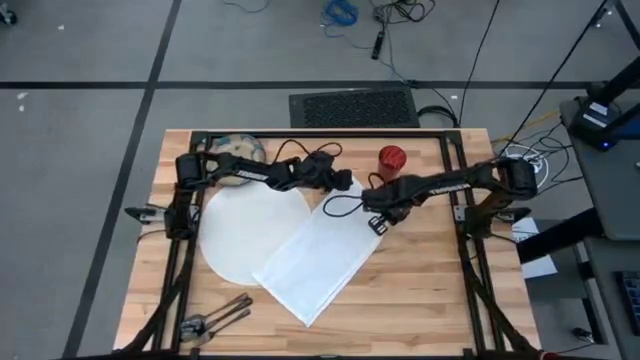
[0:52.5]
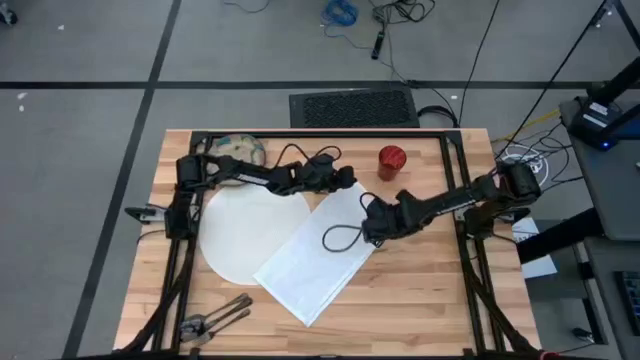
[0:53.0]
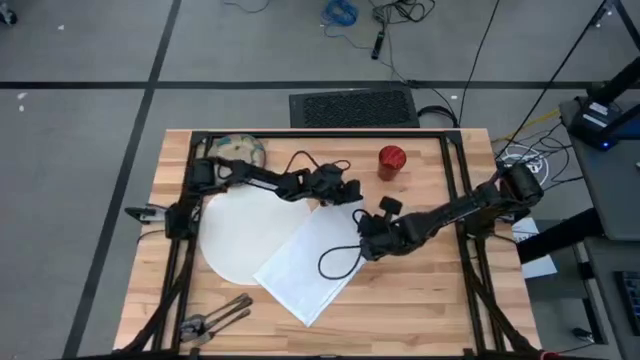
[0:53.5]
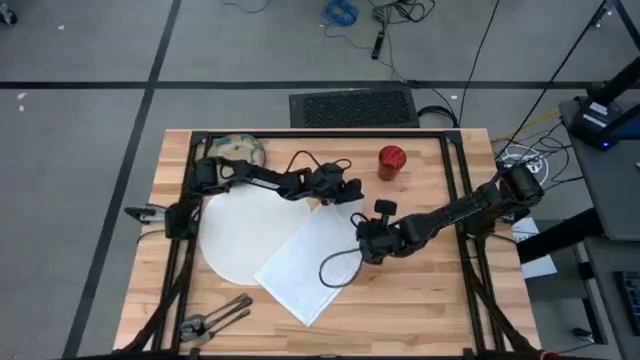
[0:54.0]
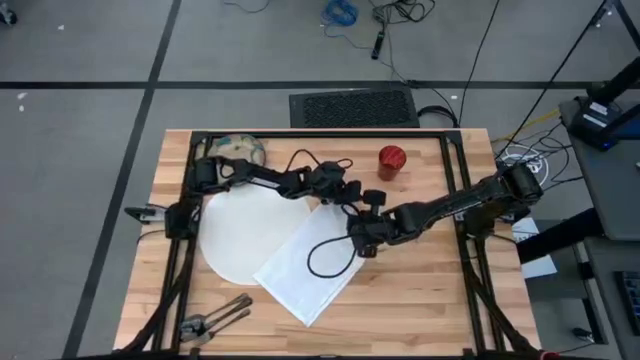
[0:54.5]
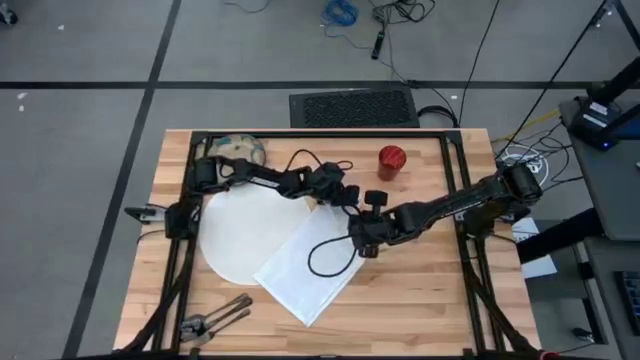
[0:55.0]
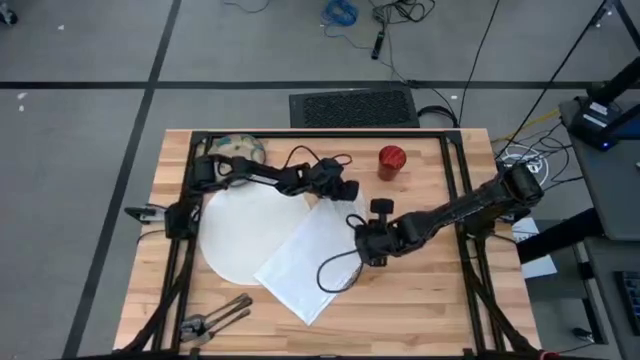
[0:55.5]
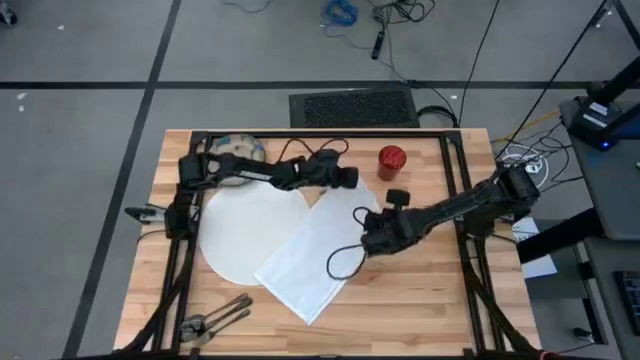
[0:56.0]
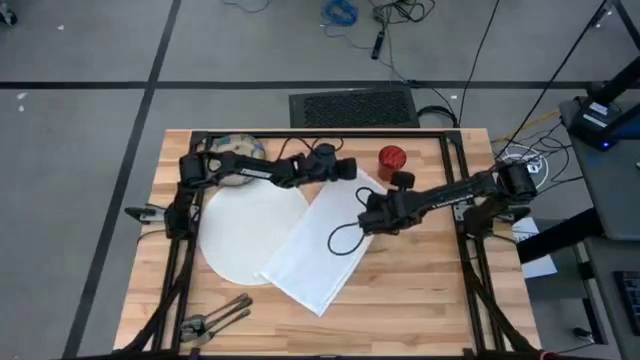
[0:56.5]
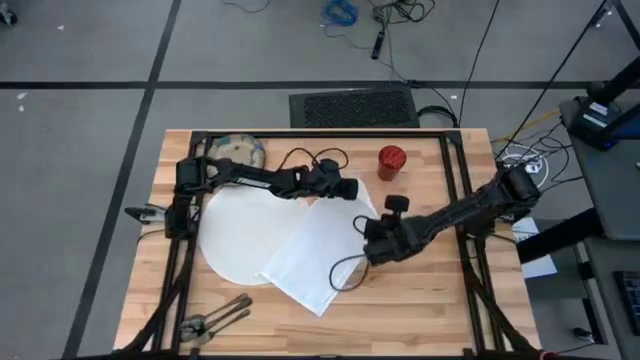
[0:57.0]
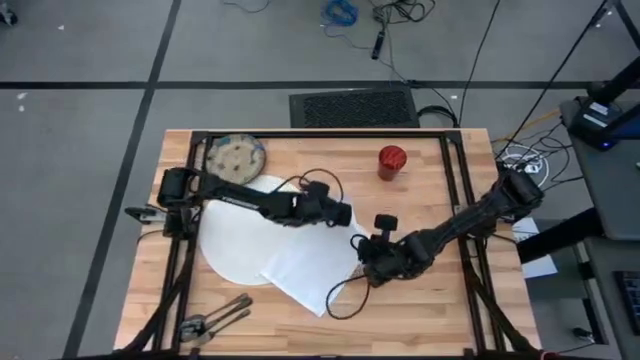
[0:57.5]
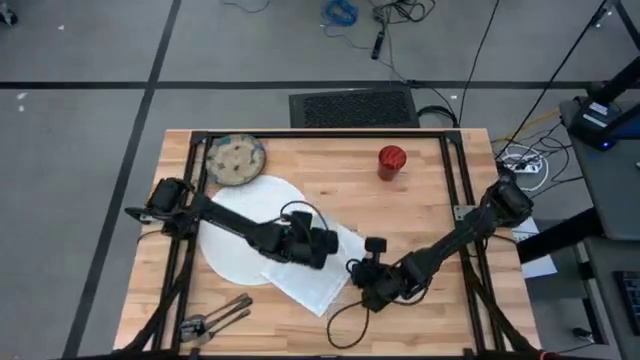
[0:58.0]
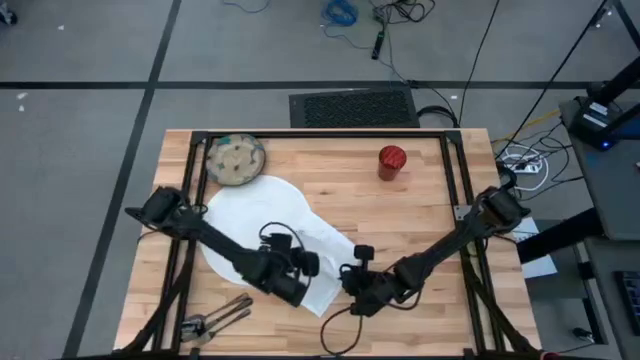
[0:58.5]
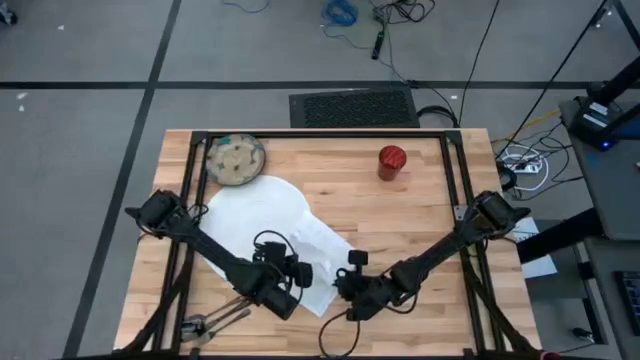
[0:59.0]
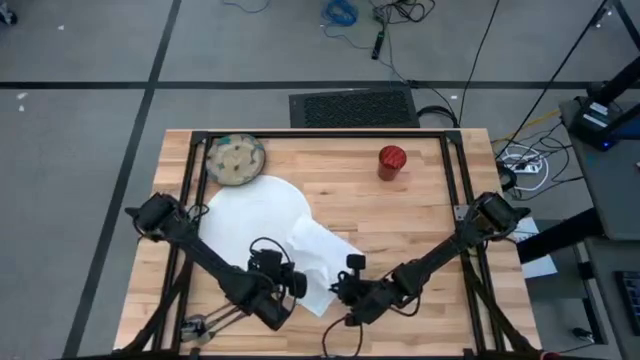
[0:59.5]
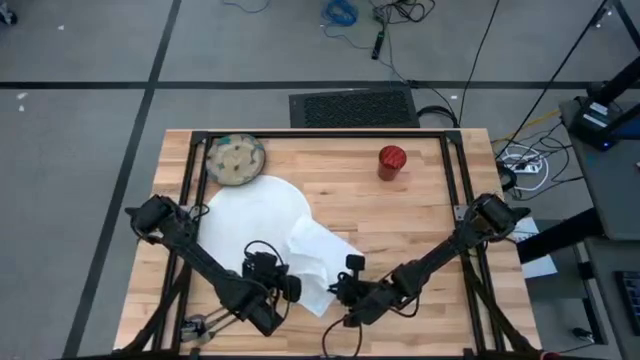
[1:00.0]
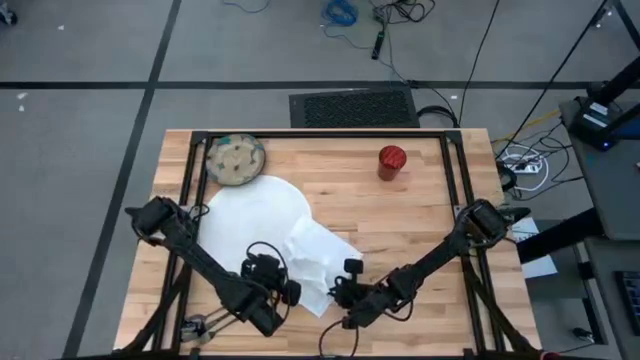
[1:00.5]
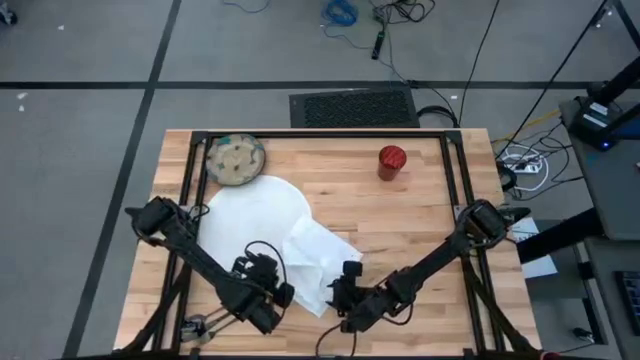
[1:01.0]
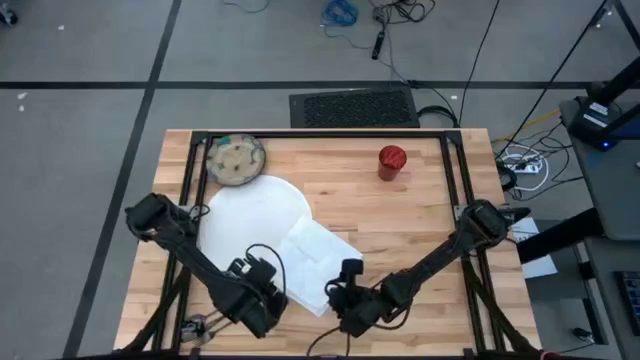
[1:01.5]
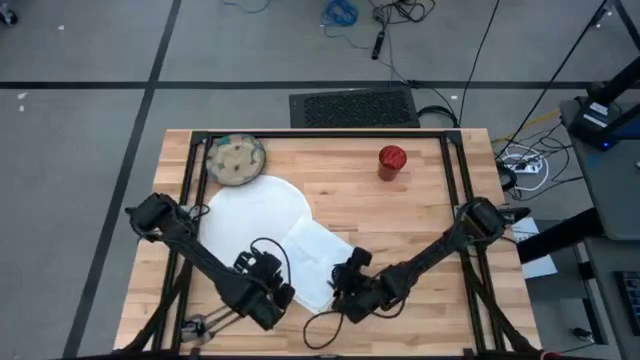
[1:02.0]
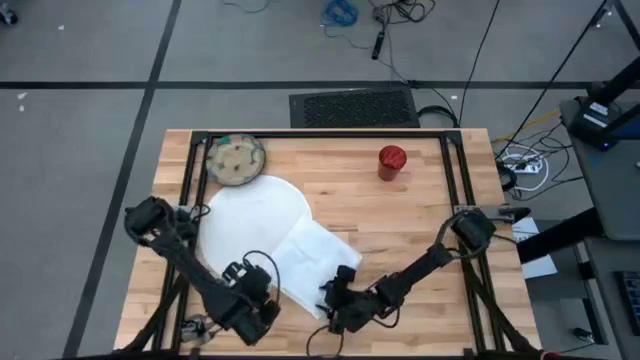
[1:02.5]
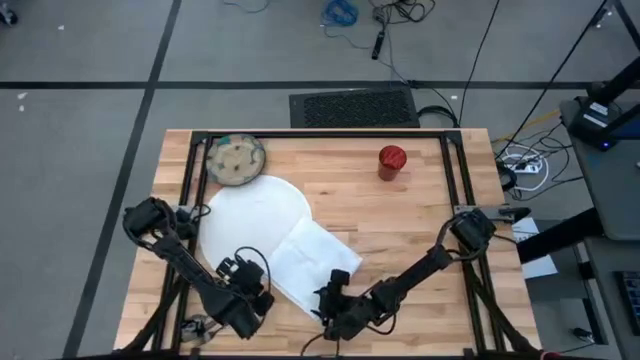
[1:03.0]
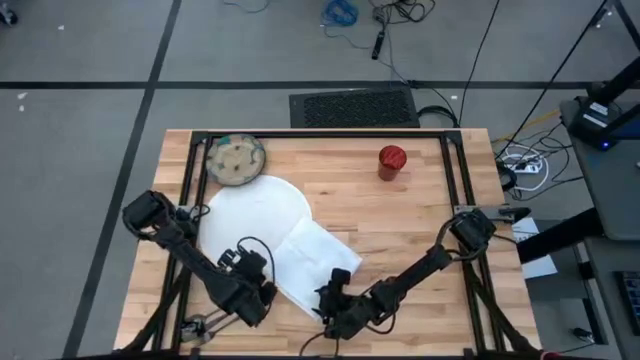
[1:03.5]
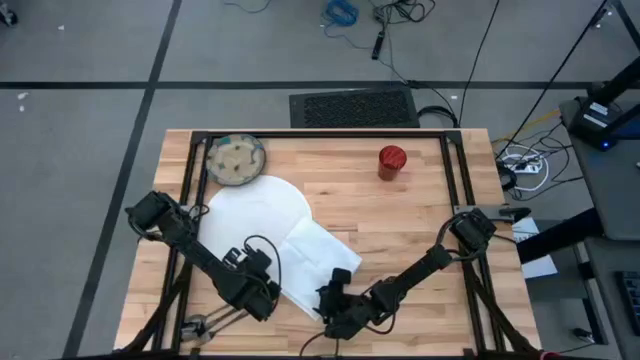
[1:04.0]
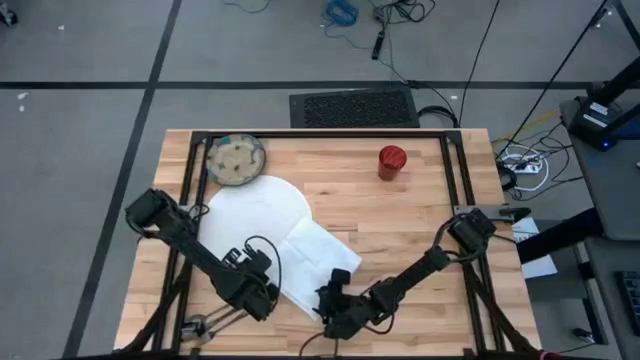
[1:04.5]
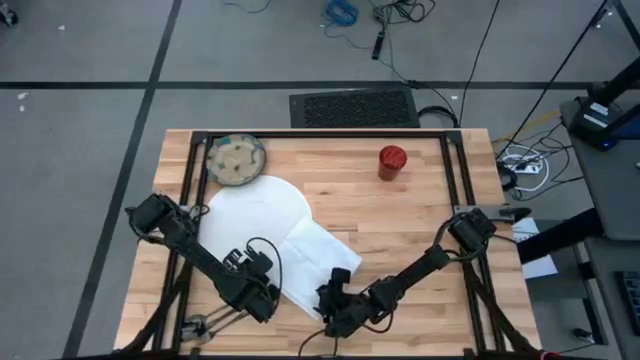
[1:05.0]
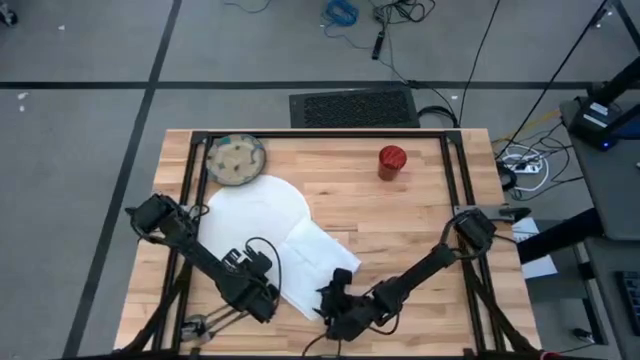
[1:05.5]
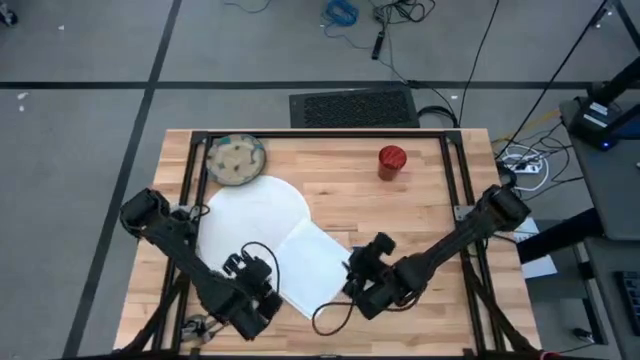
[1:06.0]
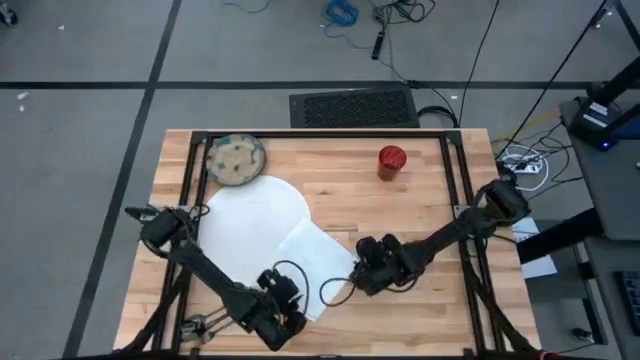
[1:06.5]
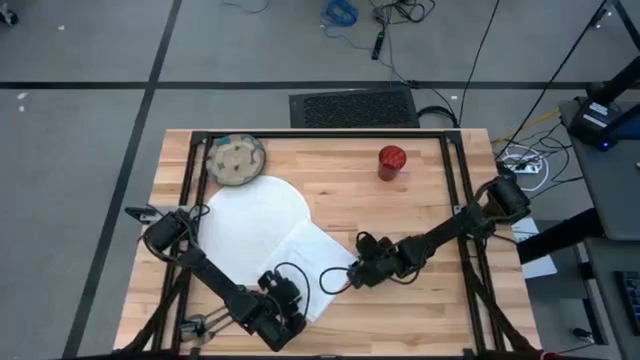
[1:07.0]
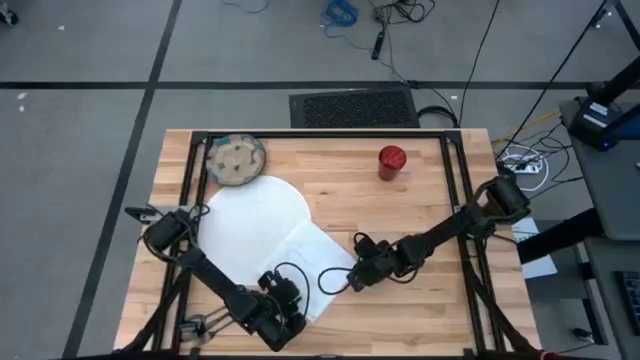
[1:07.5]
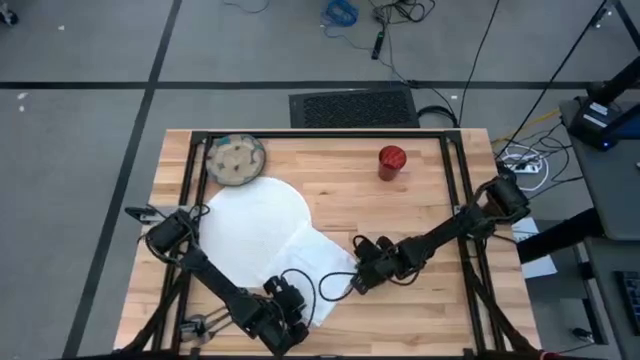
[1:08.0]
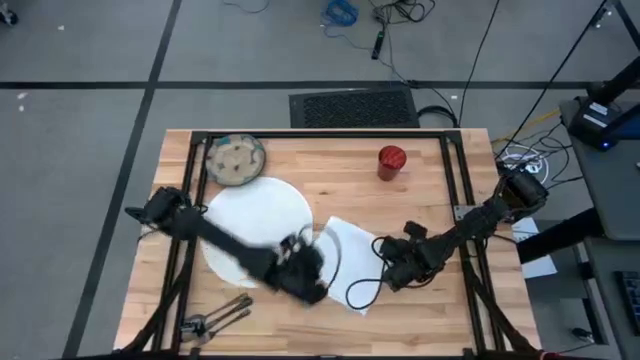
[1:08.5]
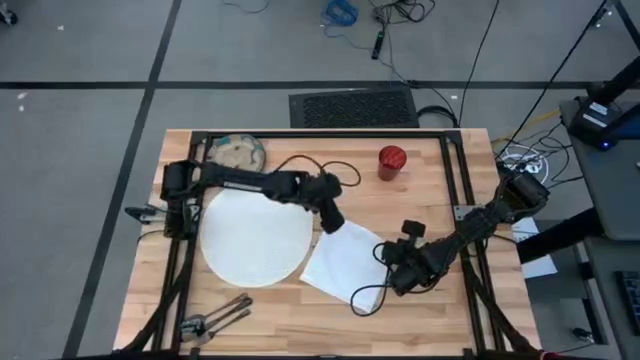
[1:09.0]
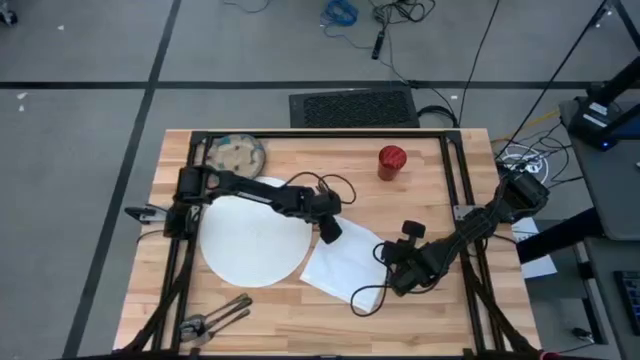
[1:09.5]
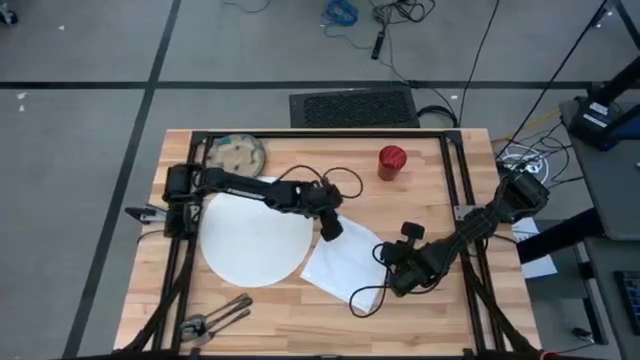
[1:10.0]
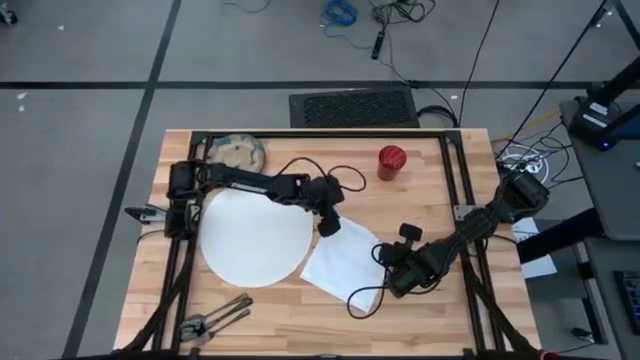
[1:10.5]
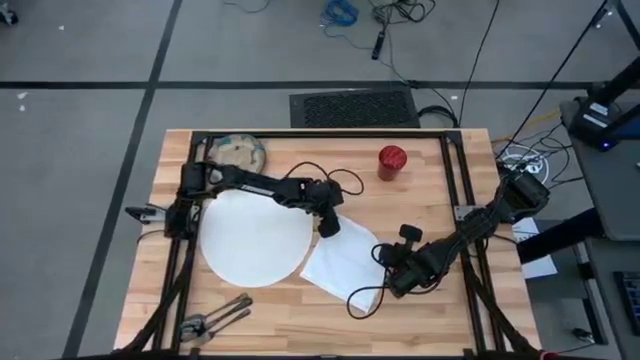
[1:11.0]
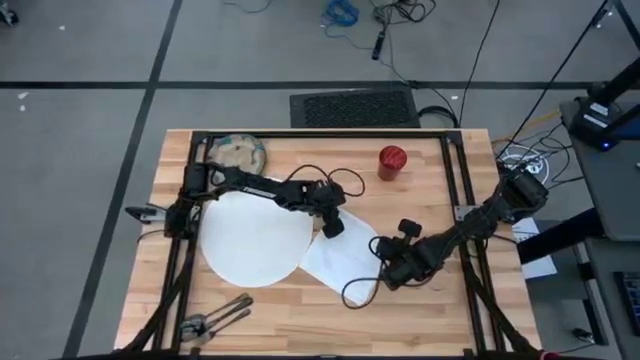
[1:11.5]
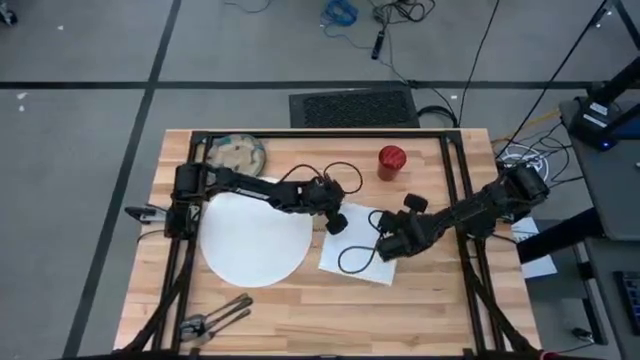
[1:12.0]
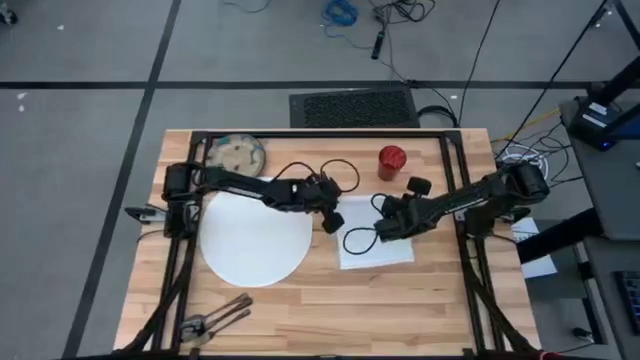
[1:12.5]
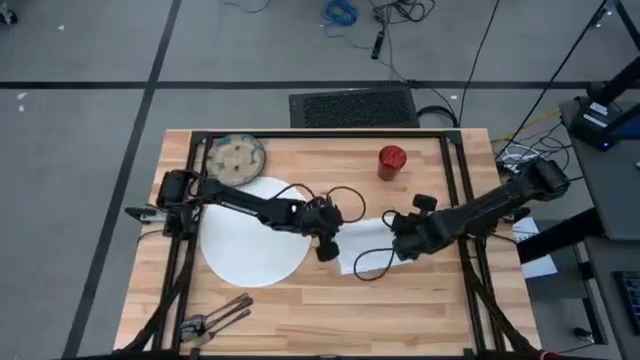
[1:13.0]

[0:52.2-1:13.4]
Task: Set table place
Fold the white napkin
